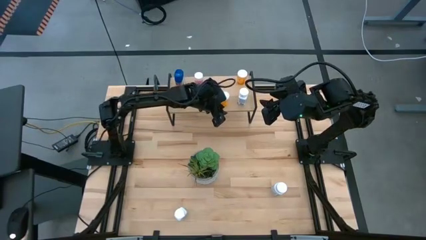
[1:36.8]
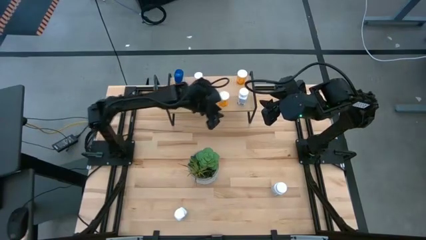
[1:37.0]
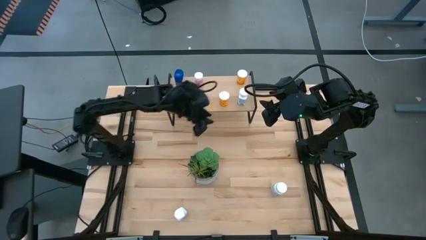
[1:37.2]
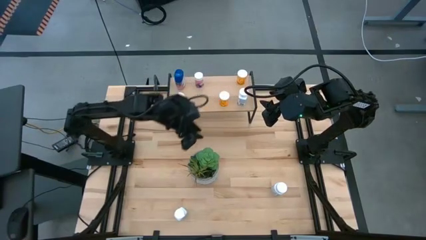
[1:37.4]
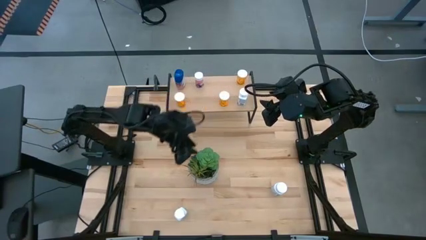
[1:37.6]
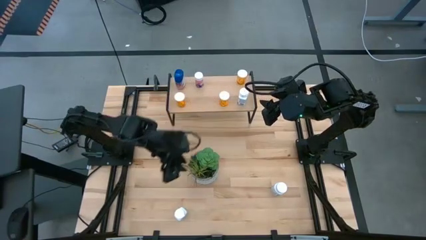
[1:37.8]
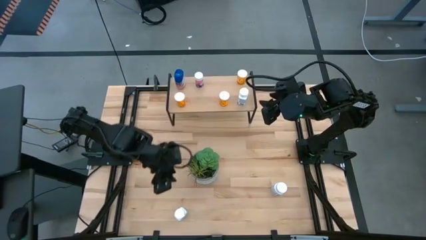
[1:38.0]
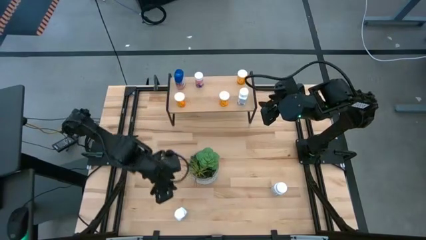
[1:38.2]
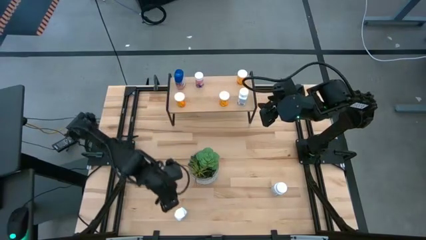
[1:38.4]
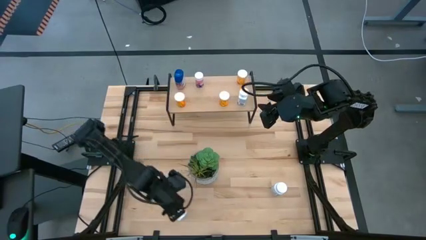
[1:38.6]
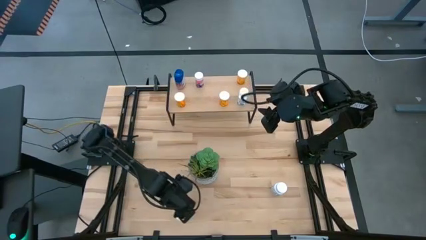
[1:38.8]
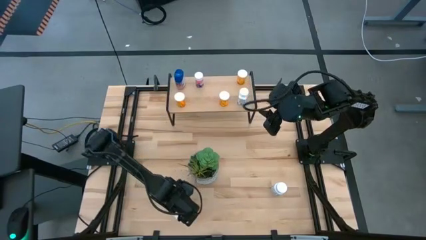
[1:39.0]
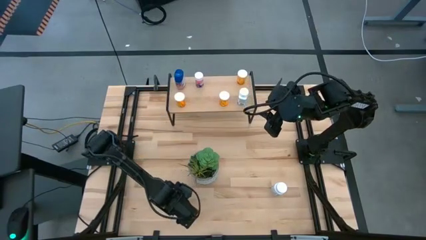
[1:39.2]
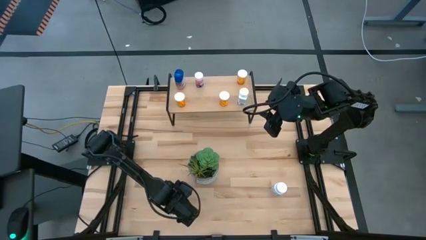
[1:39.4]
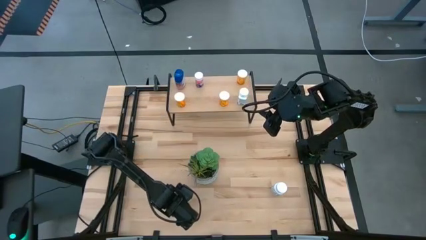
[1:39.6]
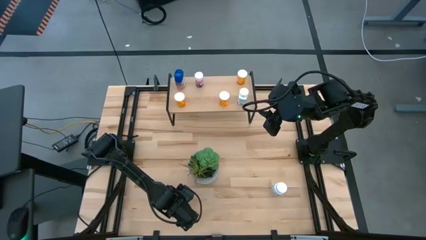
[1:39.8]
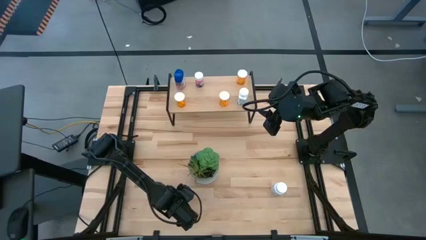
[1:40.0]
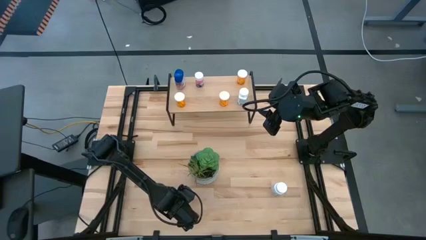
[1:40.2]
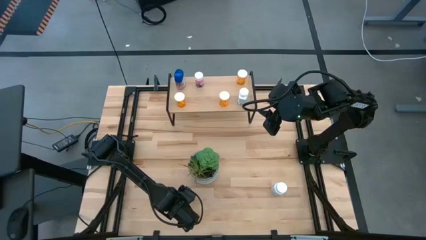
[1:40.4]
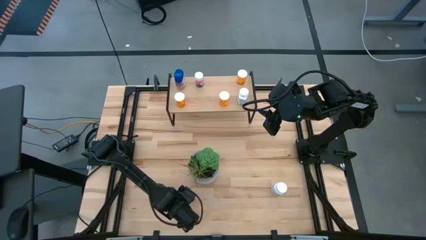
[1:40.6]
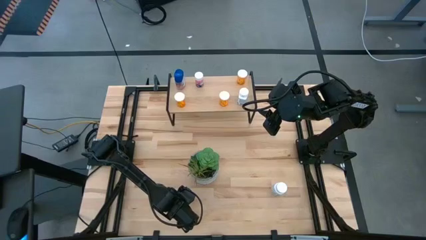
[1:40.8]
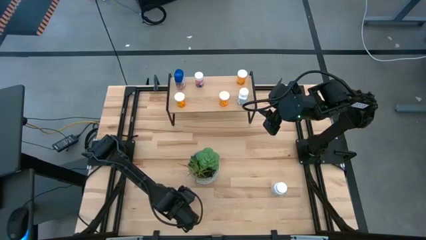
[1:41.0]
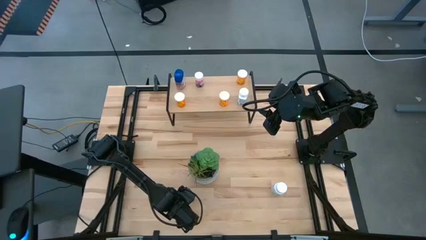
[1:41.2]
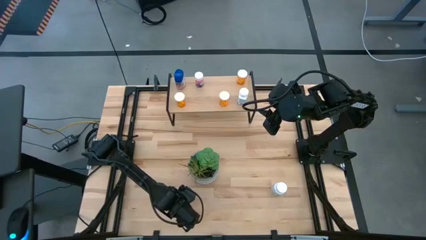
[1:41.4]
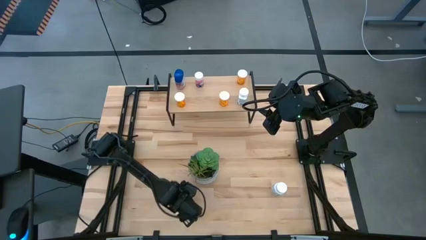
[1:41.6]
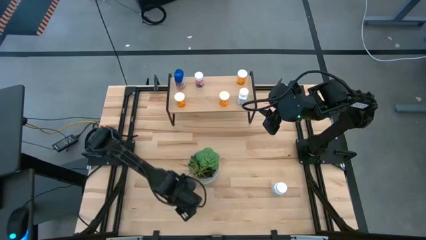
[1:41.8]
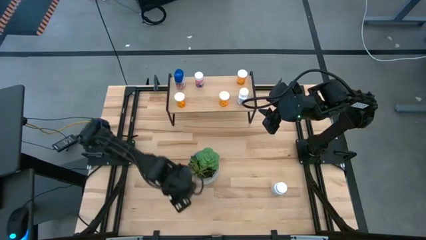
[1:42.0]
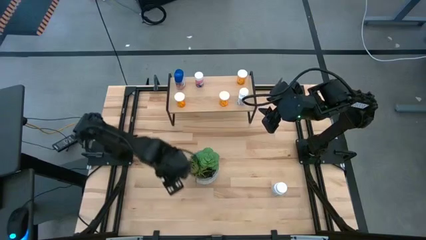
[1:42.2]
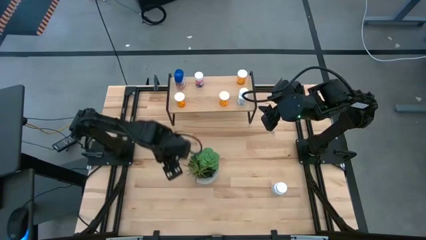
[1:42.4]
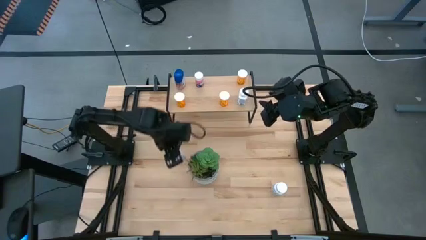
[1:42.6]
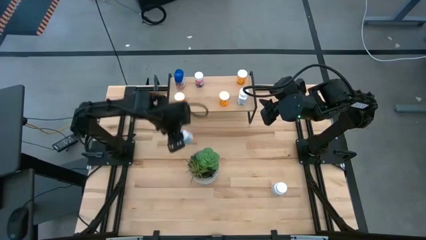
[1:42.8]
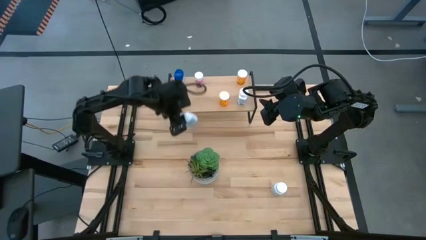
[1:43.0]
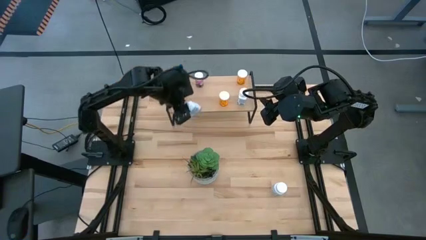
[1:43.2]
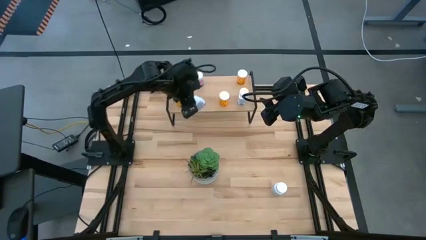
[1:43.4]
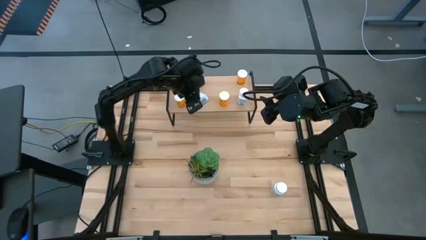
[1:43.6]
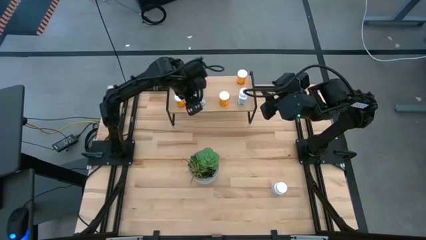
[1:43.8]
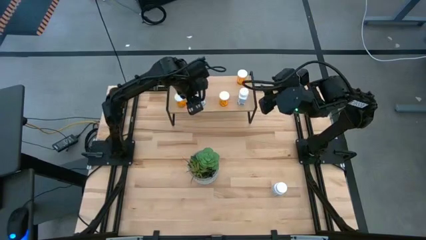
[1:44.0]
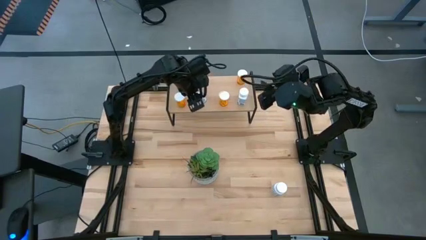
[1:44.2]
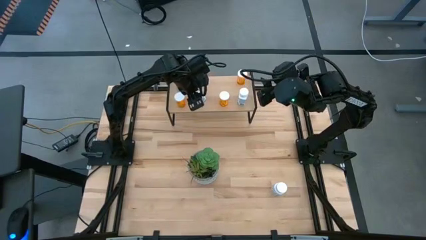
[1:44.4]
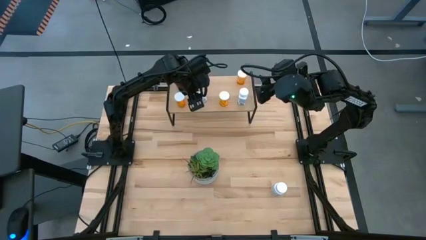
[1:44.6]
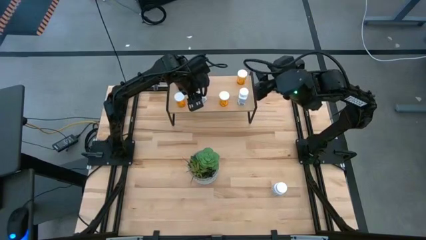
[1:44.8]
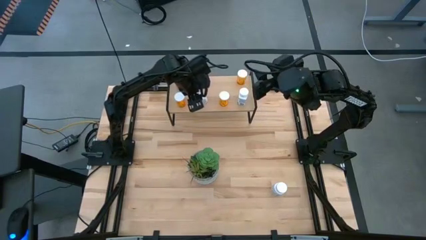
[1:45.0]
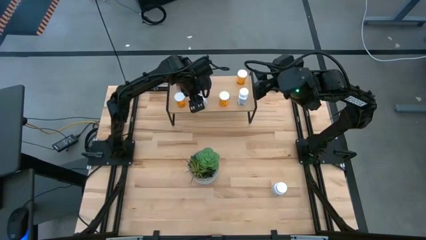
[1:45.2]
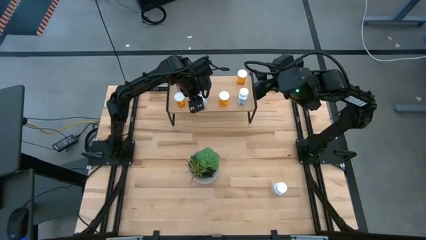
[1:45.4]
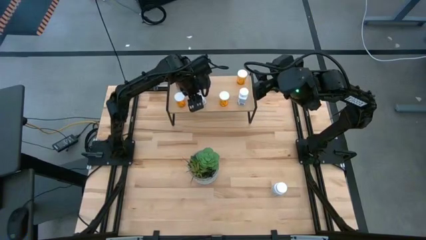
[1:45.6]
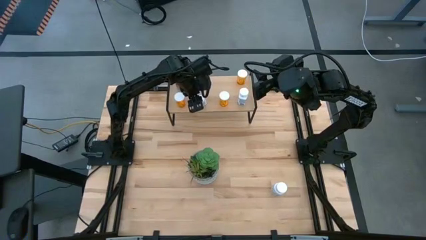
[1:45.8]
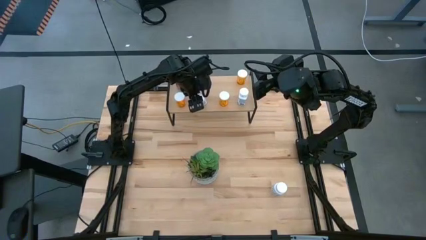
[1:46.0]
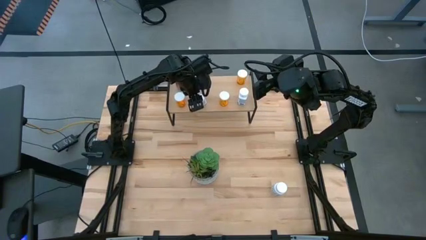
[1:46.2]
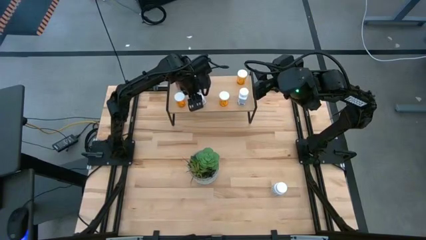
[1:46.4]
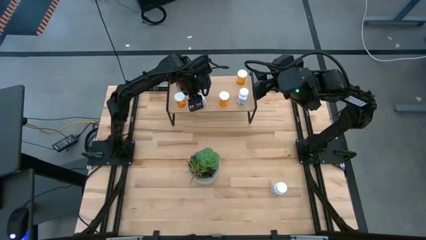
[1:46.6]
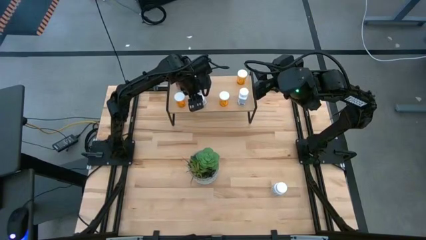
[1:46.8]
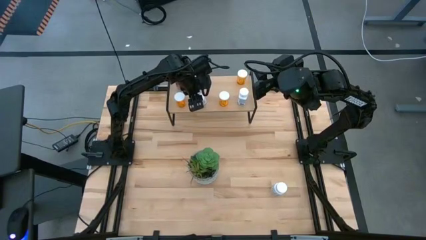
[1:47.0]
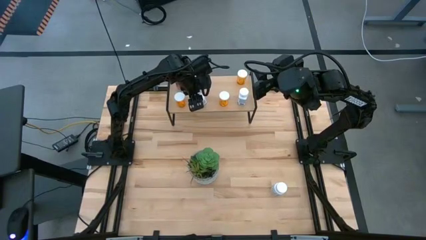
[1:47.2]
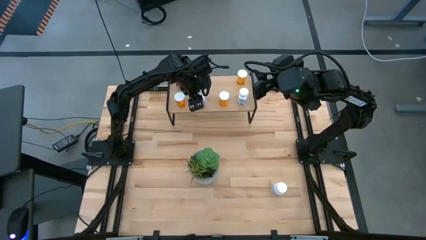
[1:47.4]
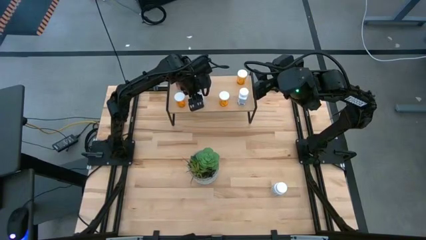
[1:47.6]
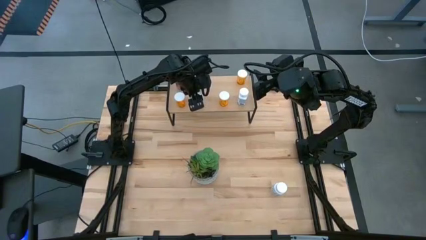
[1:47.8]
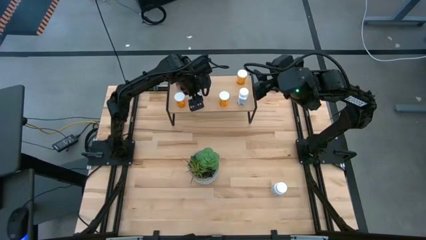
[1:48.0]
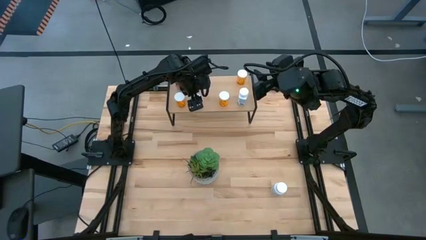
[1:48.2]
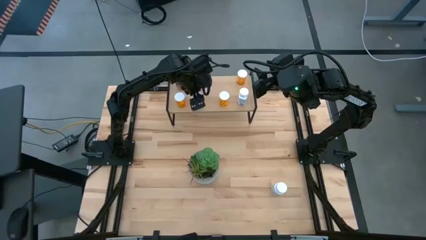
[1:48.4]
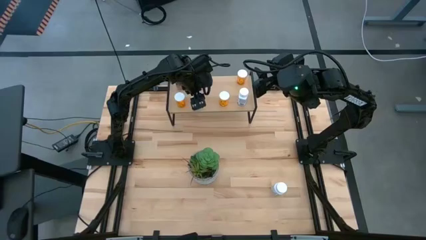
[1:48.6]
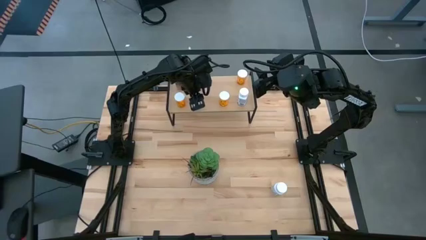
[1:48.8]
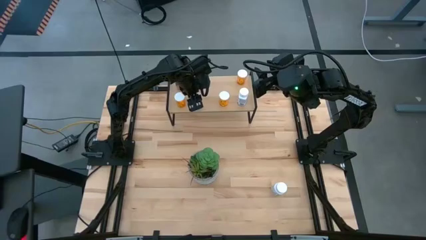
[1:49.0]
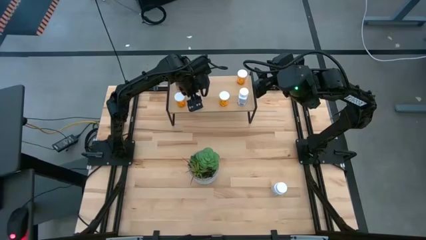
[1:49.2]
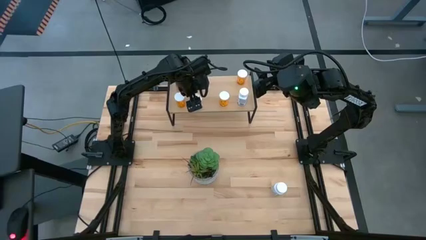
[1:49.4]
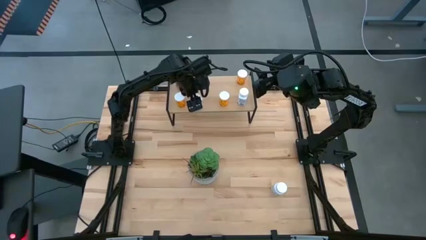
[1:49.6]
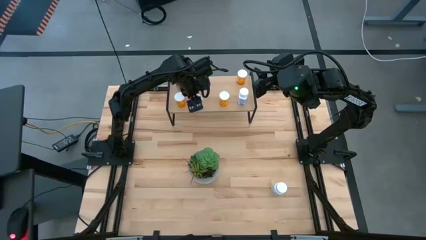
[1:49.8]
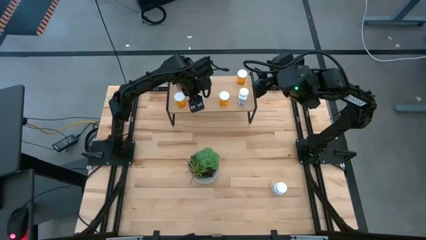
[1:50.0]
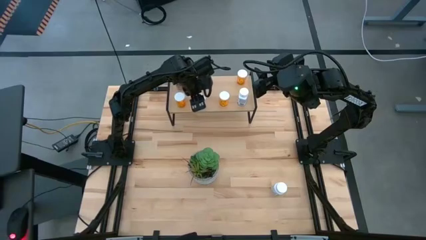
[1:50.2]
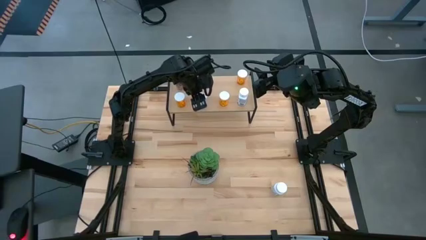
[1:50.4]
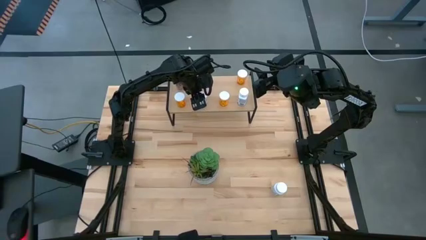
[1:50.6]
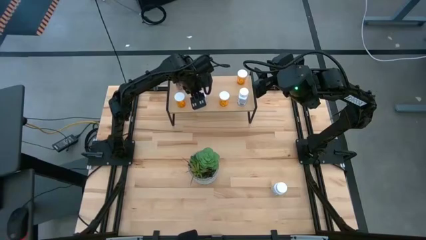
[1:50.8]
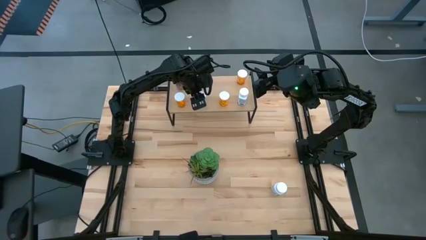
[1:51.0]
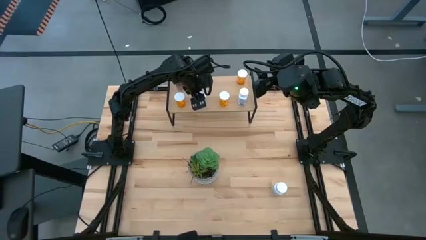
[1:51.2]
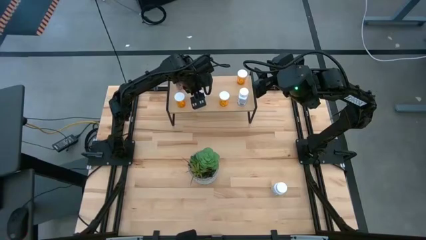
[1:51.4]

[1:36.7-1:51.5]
Task: Pick and place medicine bottles onto shelf by color
Put the bottom white pill bottle on the shelf
